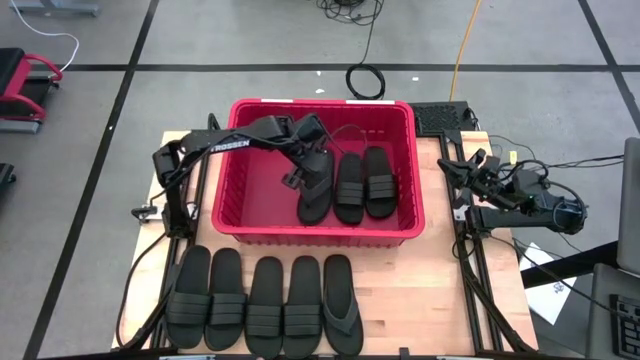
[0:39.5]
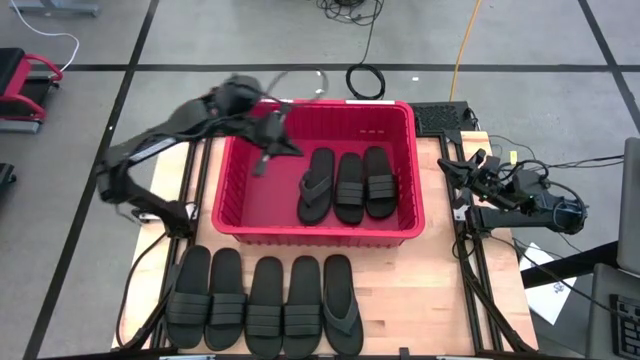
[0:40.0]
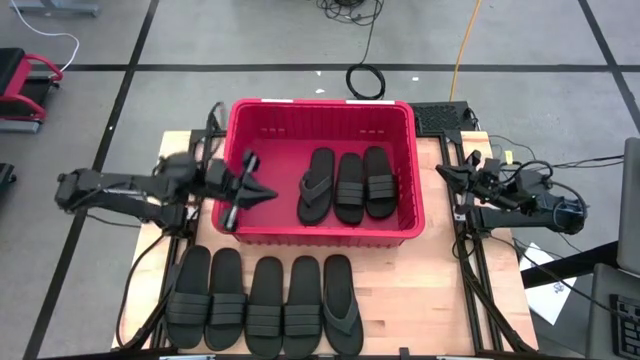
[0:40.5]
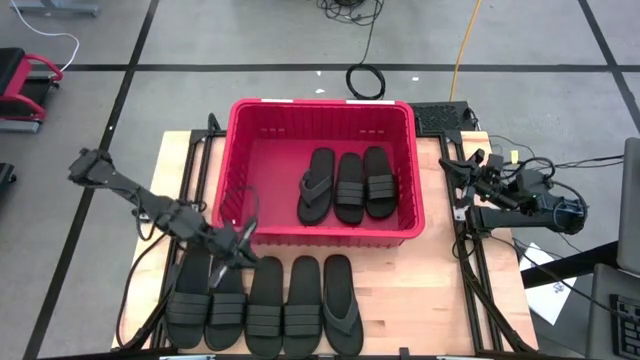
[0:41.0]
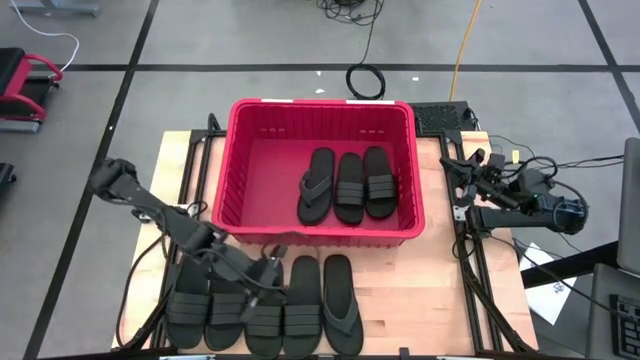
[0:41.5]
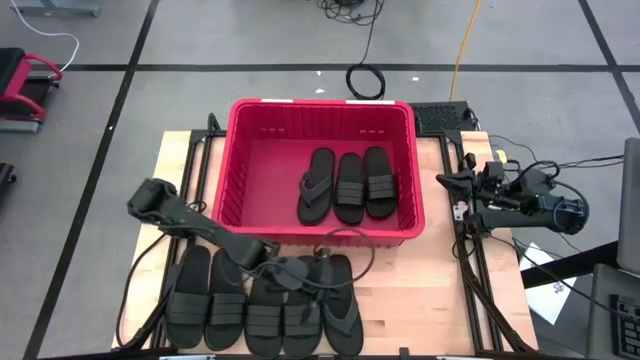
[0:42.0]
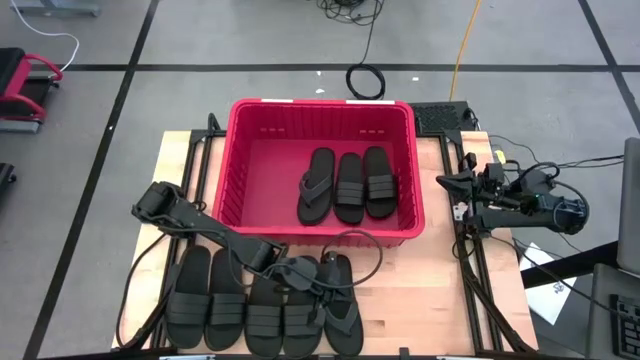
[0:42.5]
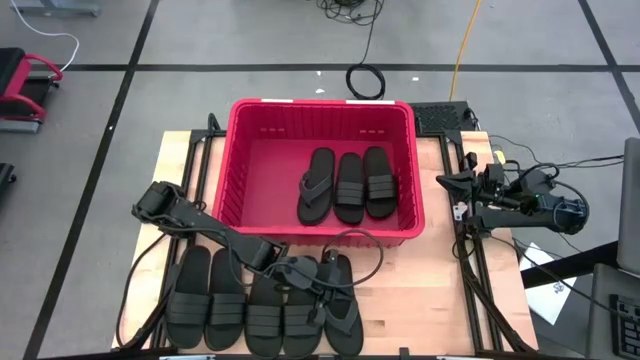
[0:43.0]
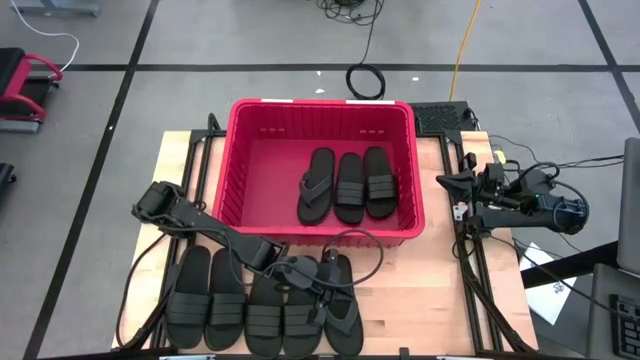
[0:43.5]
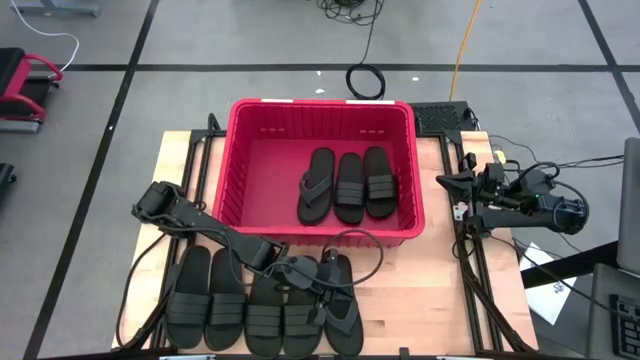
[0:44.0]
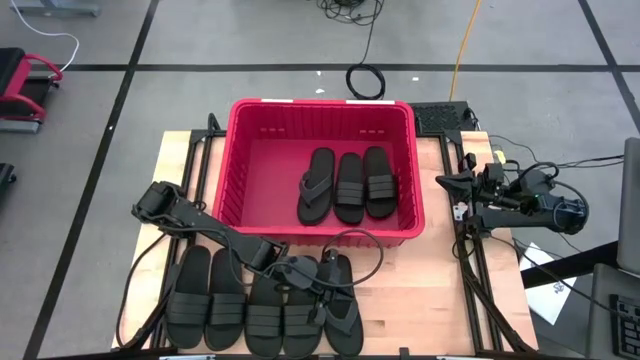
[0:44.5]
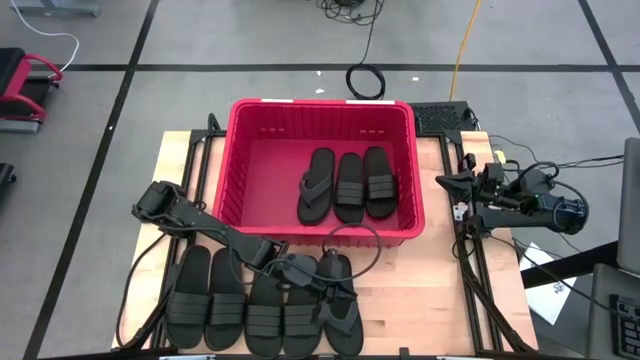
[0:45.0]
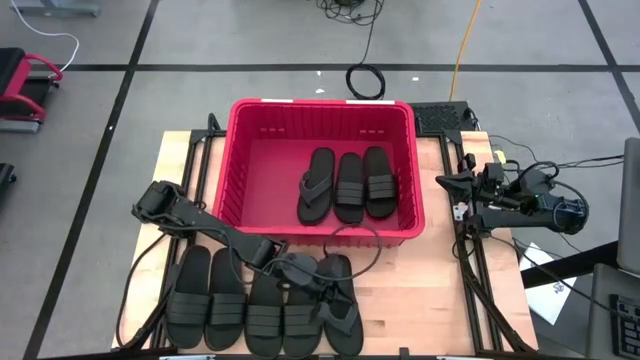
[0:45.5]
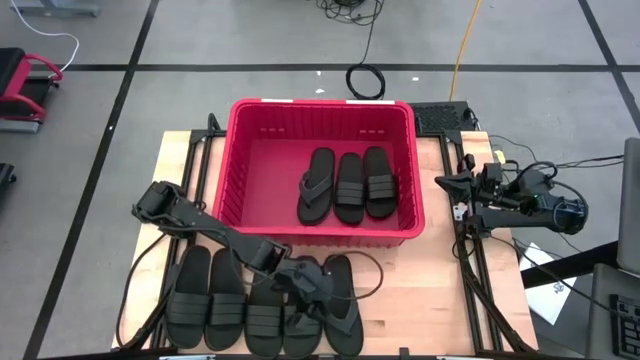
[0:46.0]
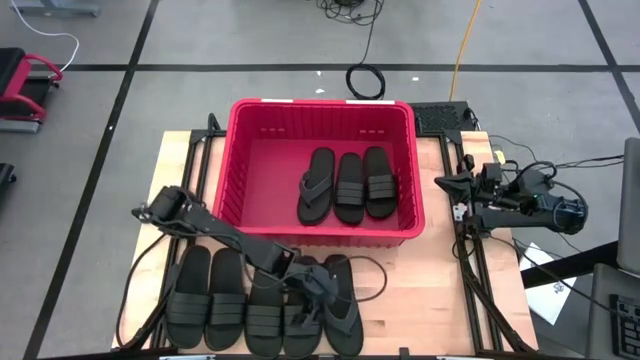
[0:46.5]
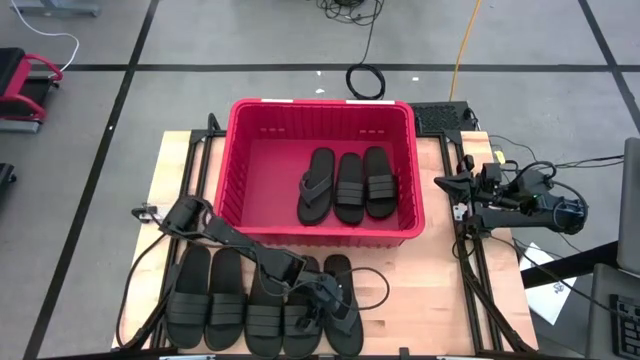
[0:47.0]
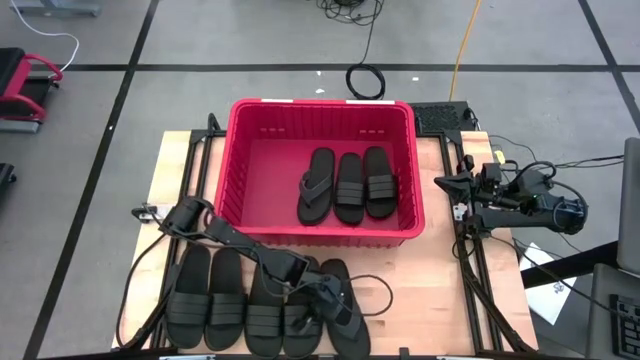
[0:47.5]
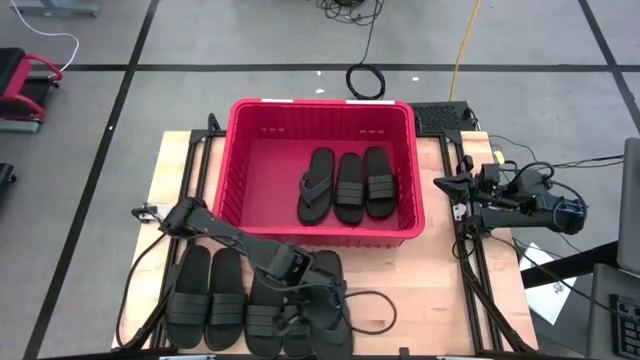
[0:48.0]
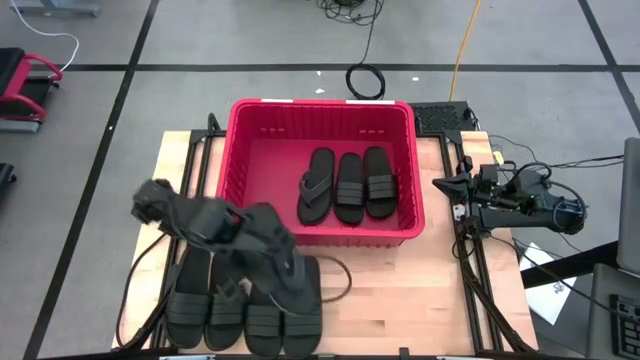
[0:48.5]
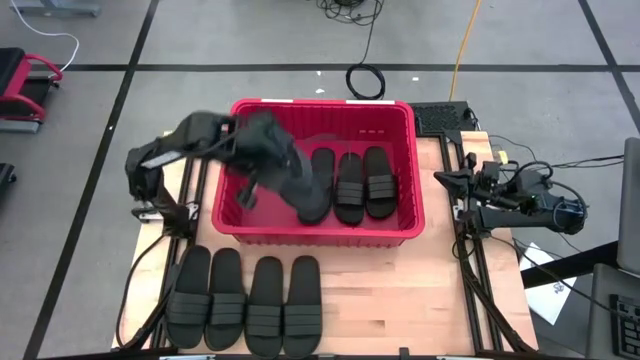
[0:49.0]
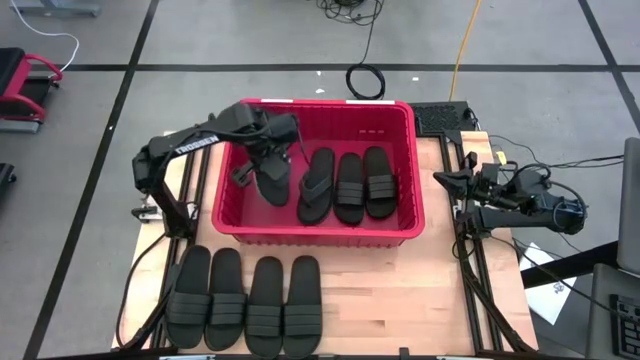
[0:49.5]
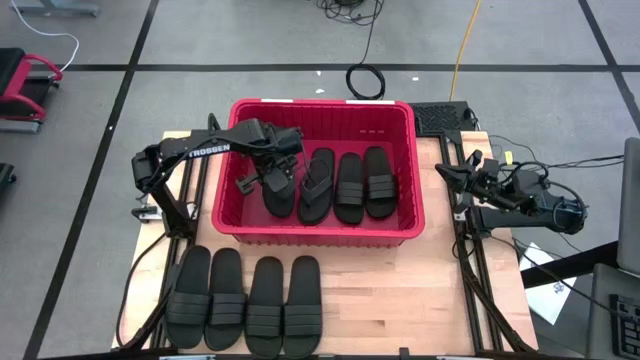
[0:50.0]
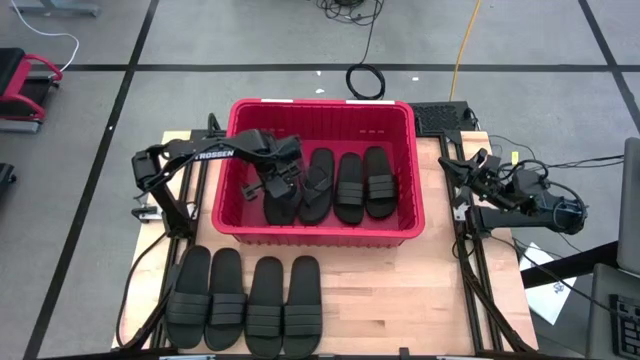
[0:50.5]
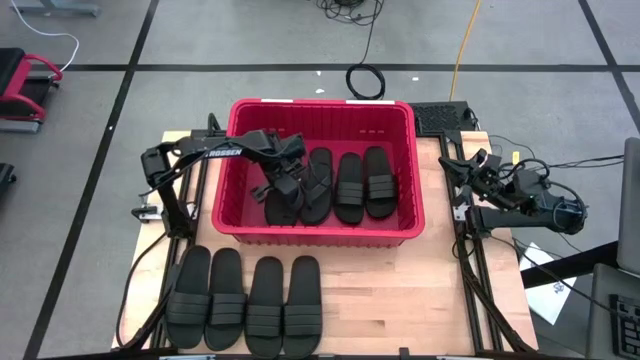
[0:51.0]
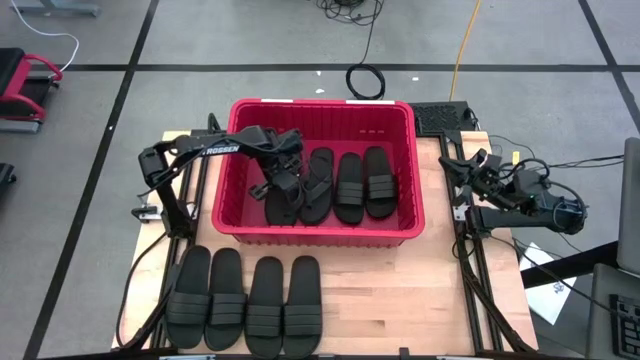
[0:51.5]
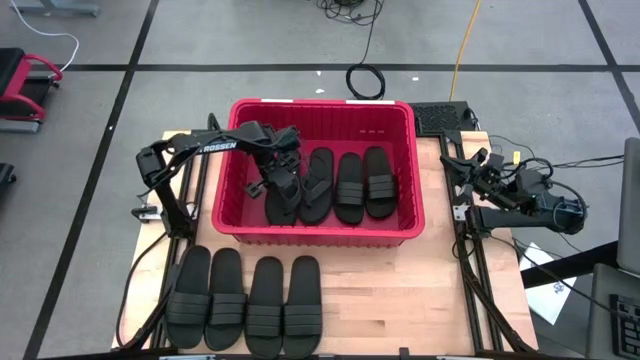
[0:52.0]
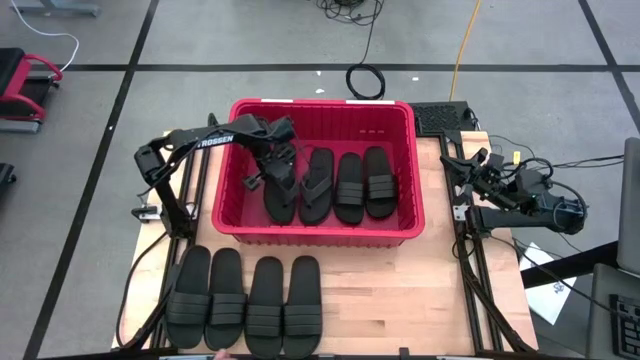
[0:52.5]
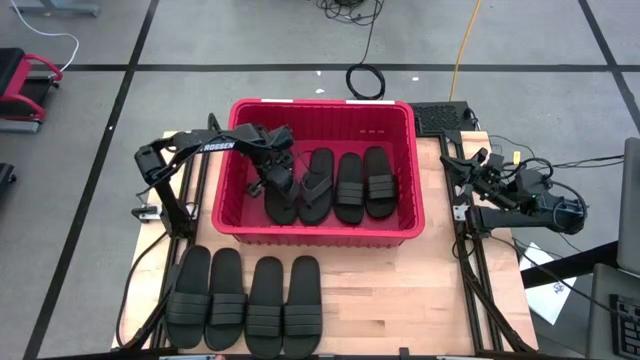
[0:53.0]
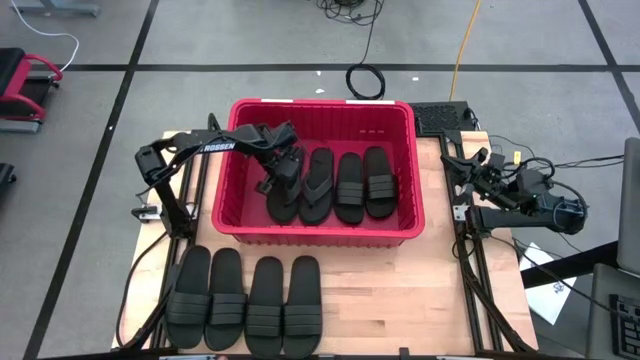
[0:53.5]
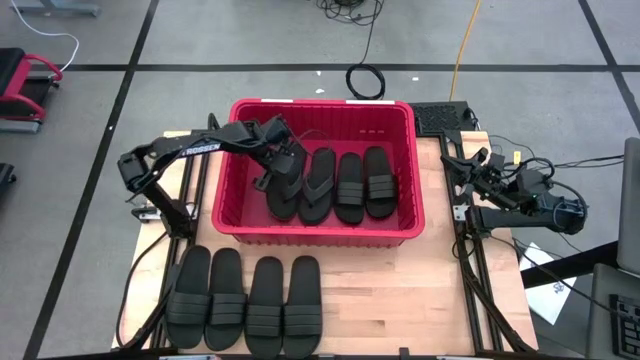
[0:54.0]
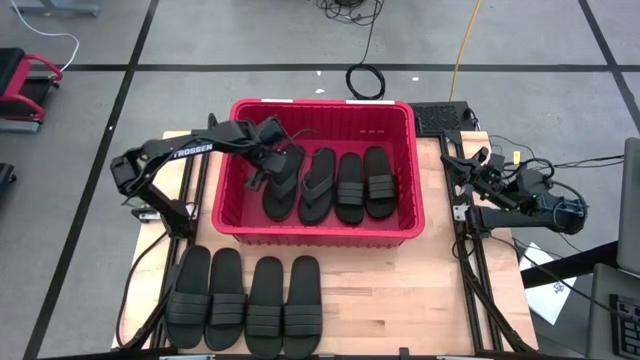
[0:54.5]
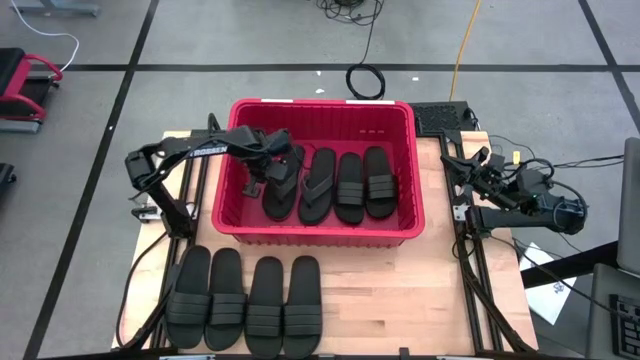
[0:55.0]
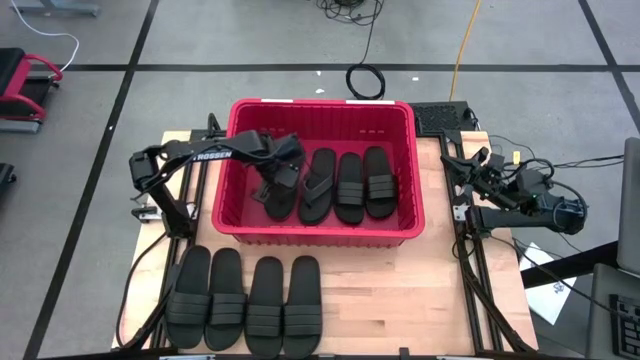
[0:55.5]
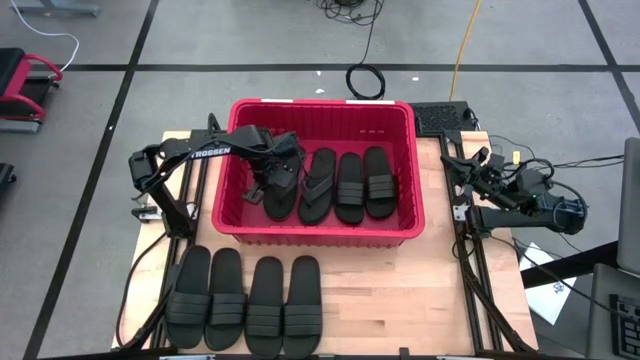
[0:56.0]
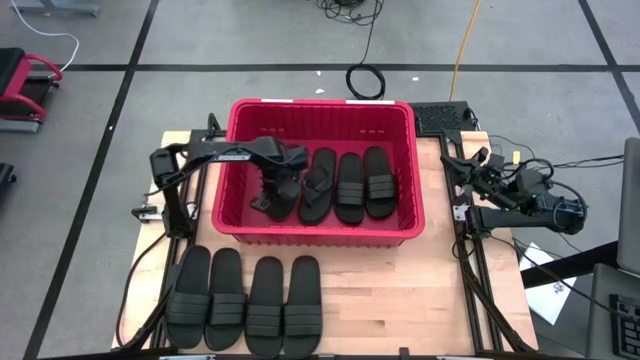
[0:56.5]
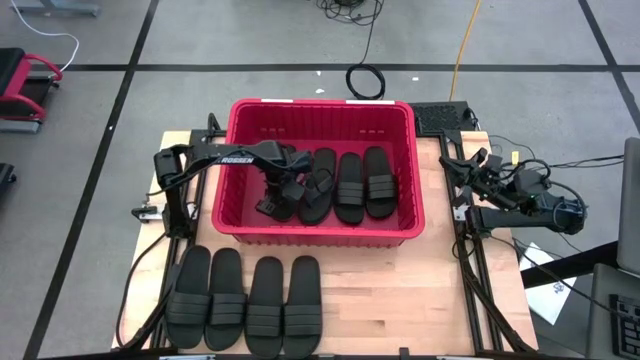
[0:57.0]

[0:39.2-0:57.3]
Task: Pick and place slides into bin
Put the flip flop into the bin

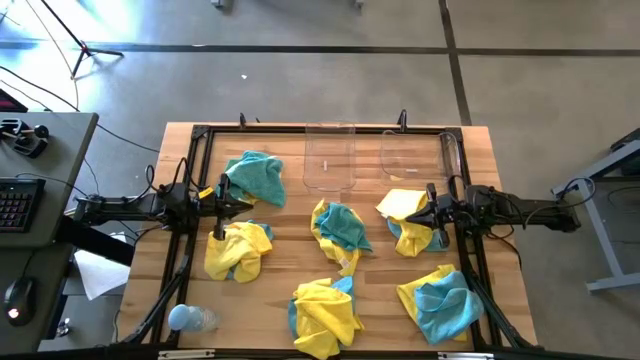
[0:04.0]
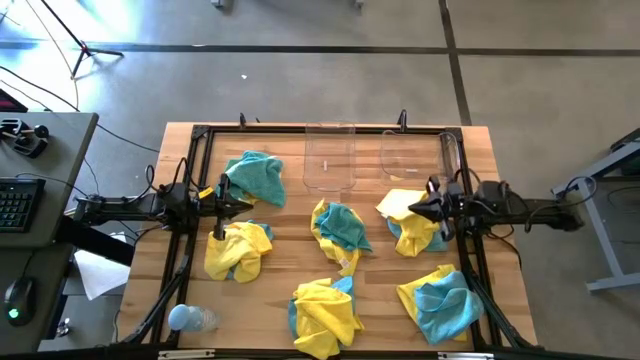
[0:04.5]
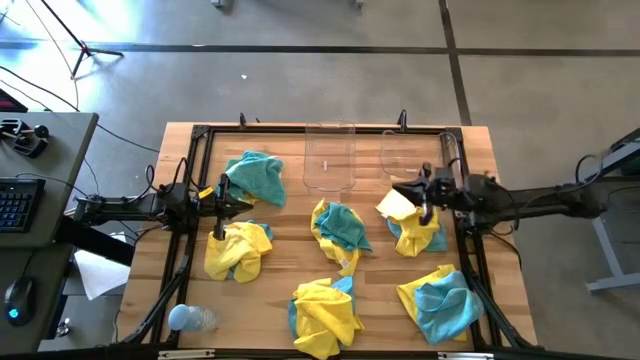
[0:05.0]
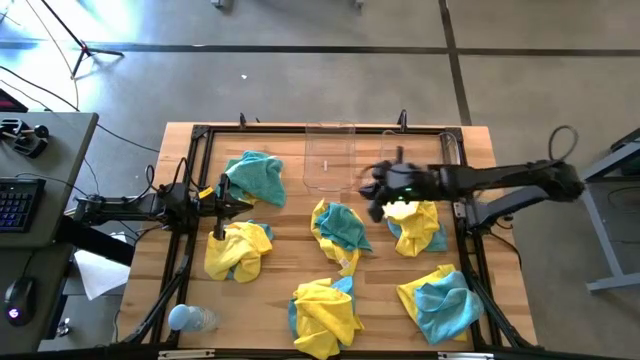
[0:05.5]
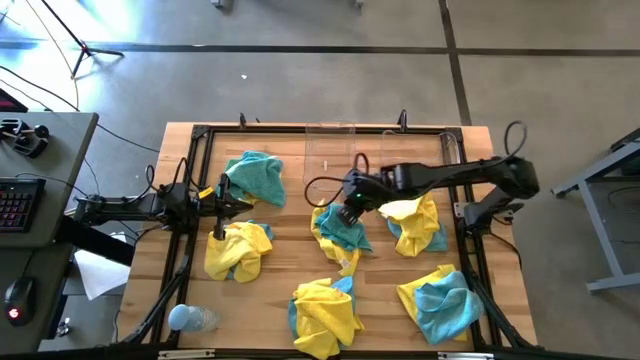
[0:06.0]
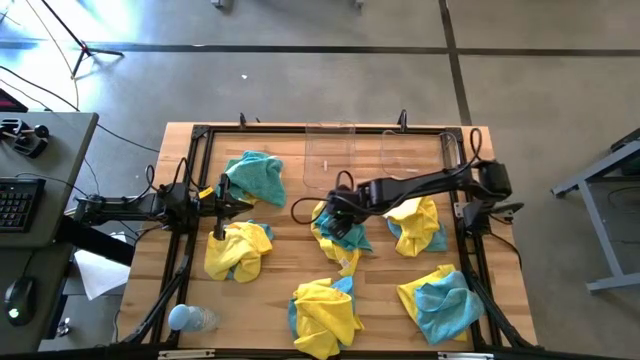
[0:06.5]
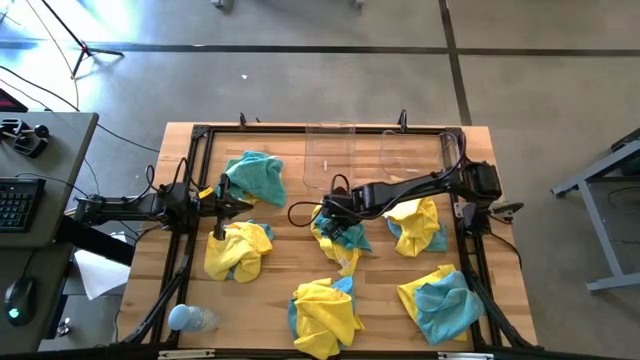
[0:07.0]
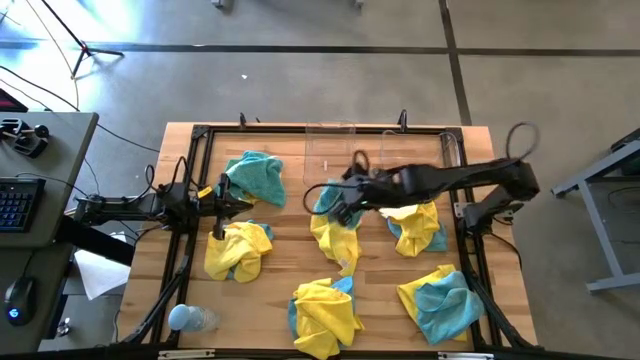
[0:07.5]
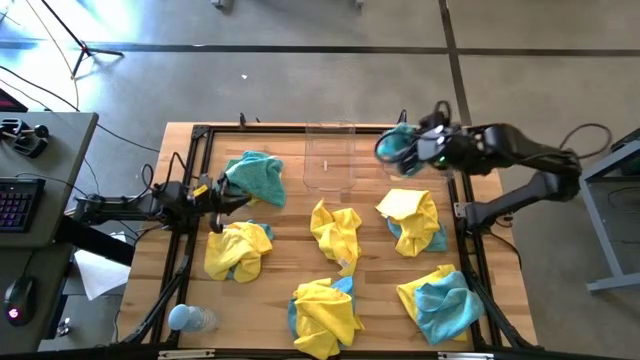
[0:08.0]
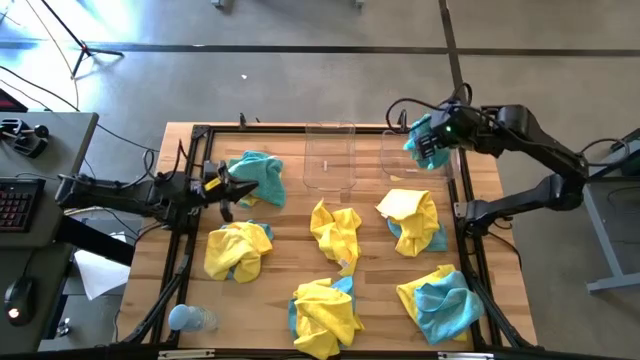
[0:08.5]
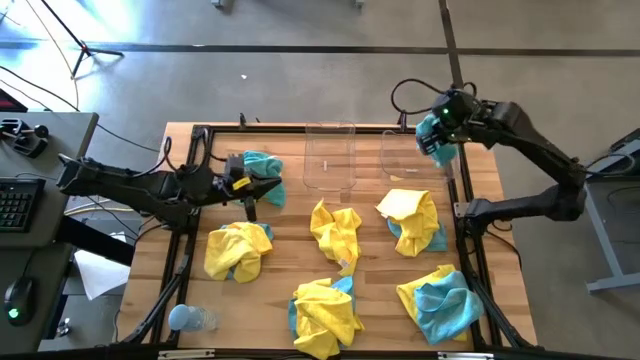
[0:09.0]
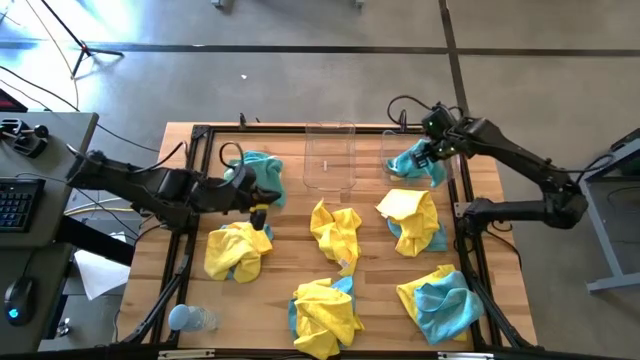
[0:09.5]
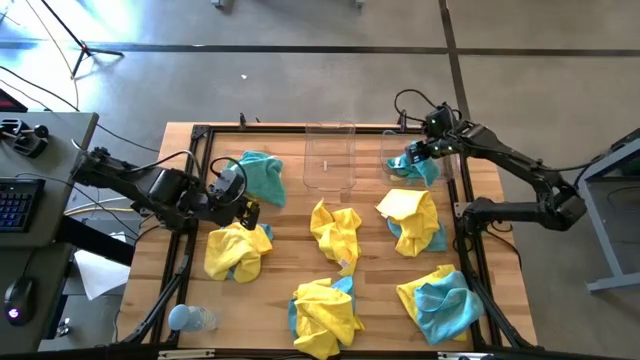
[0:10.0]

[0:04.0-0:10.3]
Task: Sort microfiber towel by color & place in baskets
Put the blue towel into the right transparent bin
